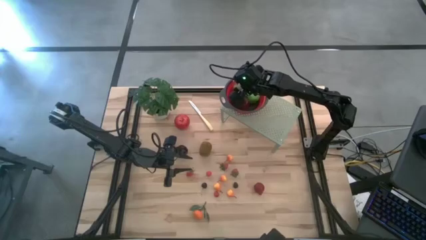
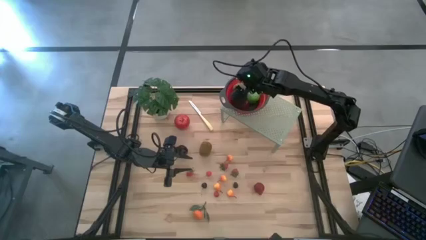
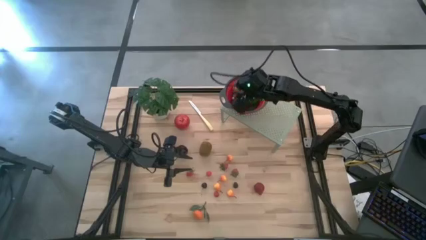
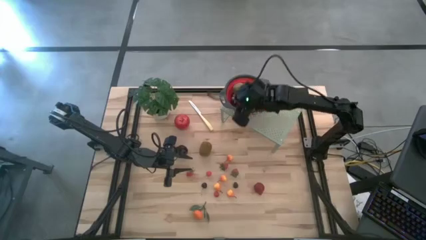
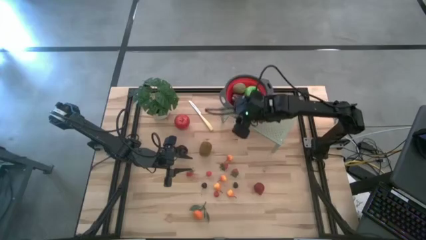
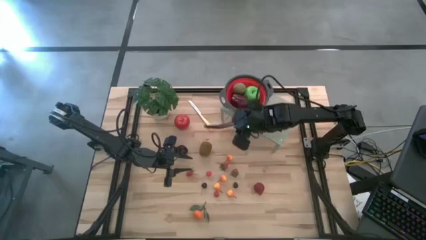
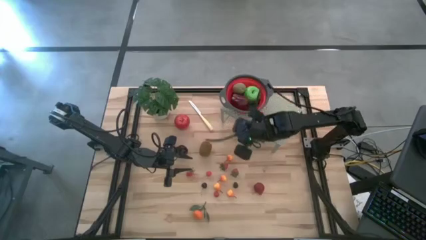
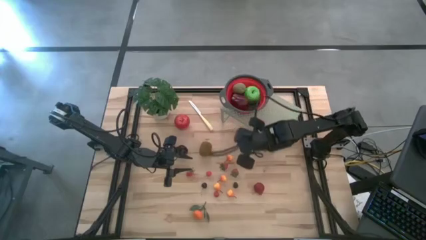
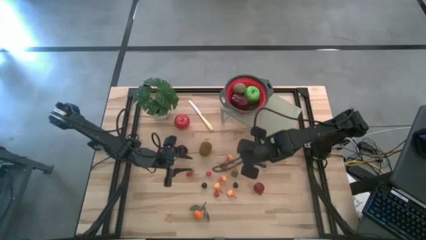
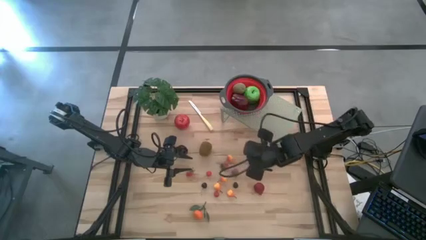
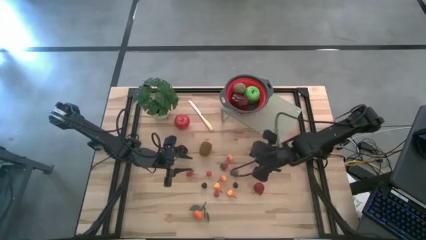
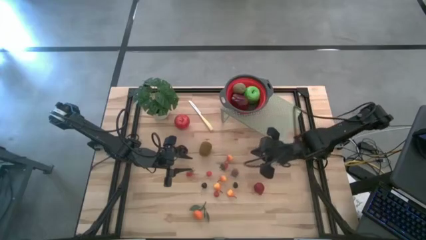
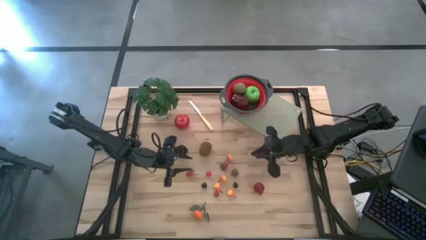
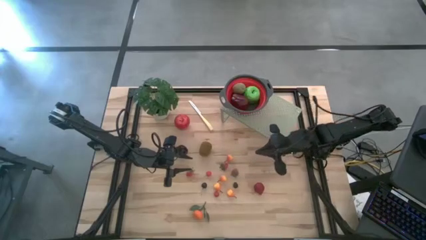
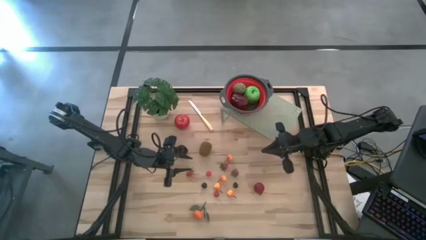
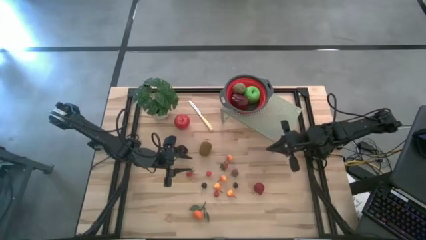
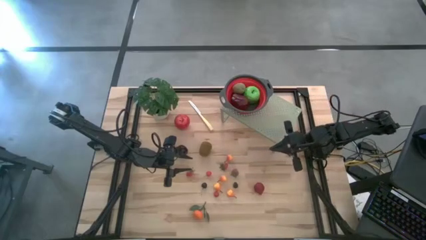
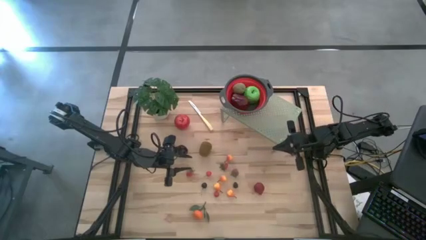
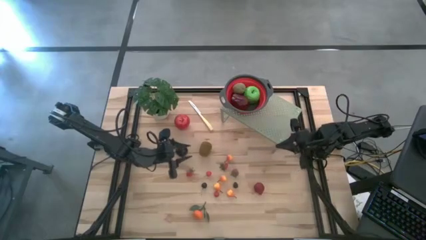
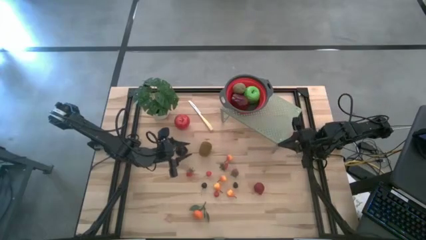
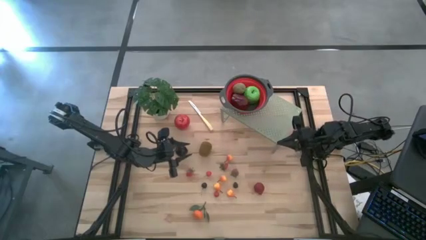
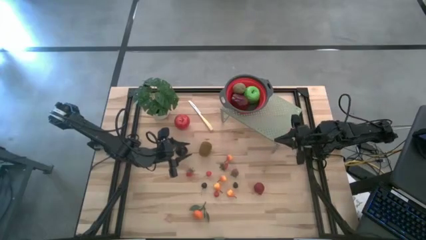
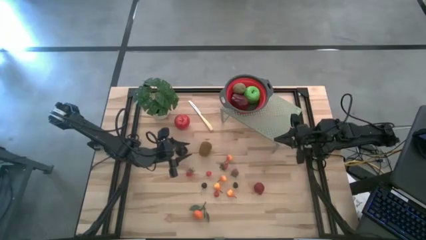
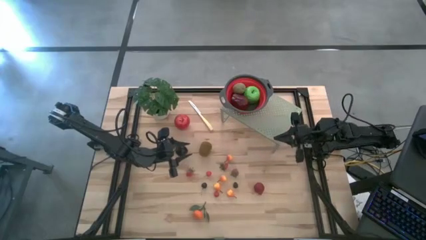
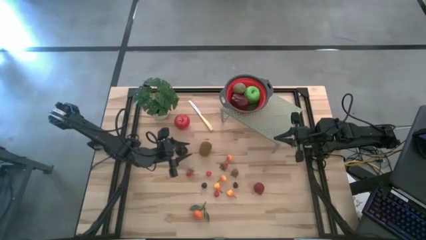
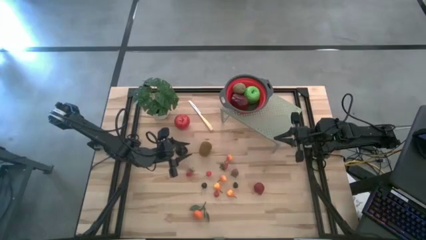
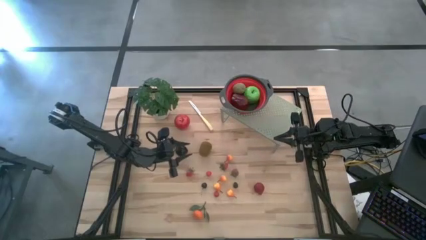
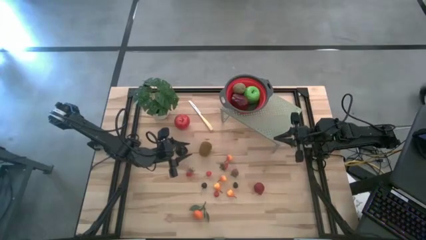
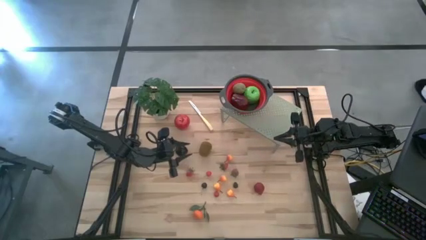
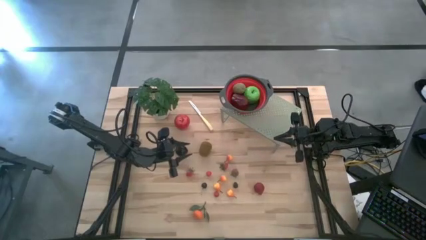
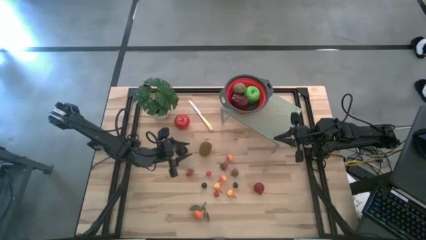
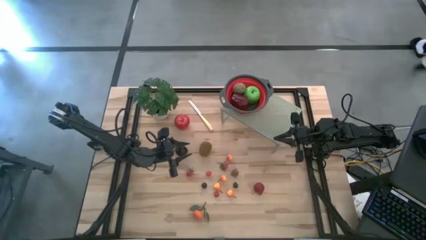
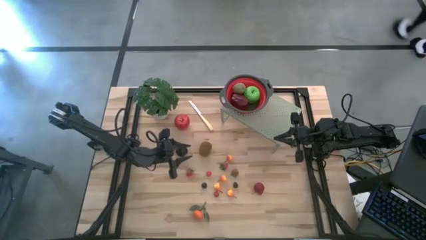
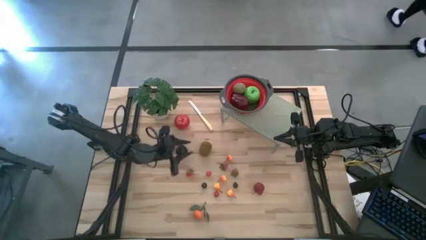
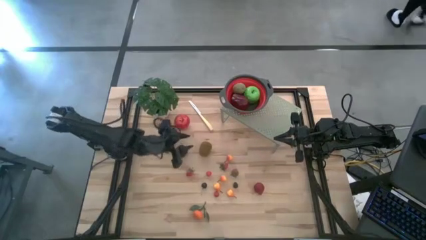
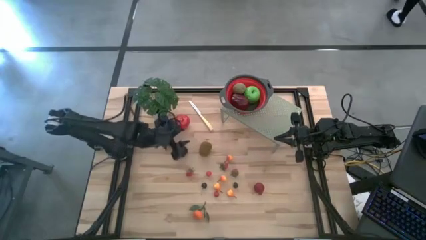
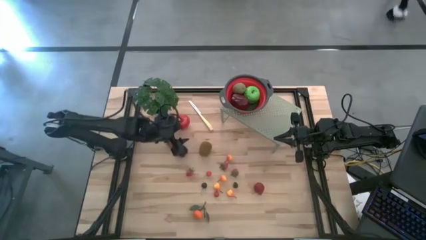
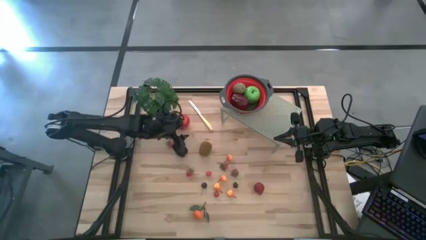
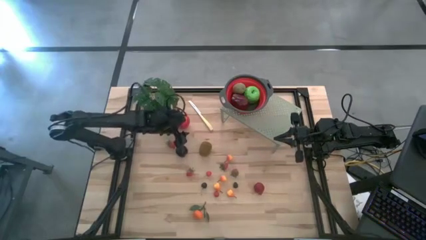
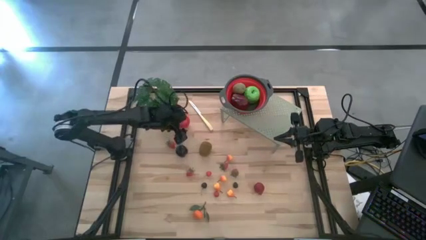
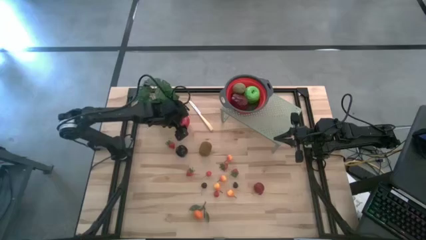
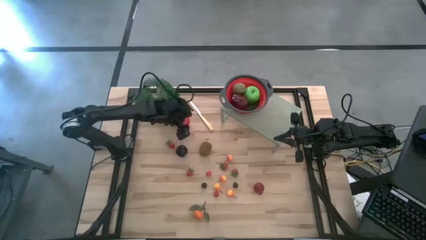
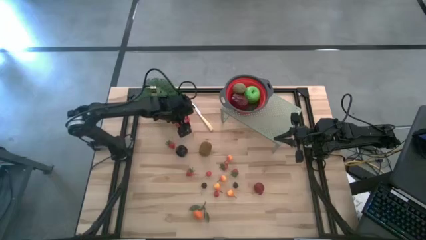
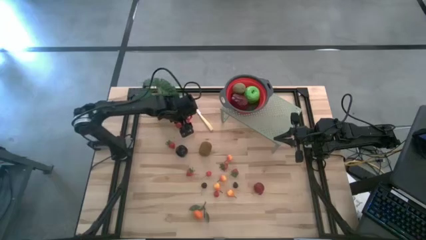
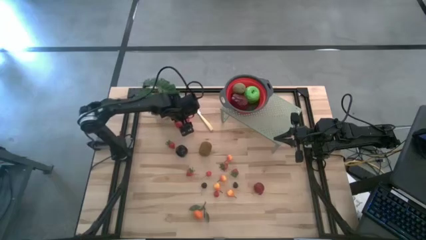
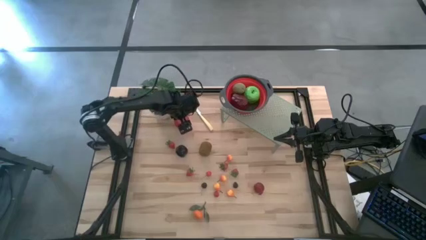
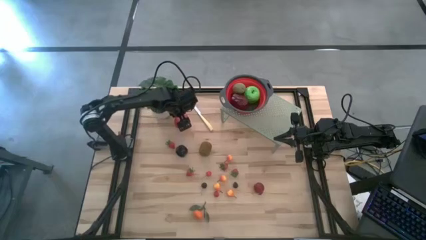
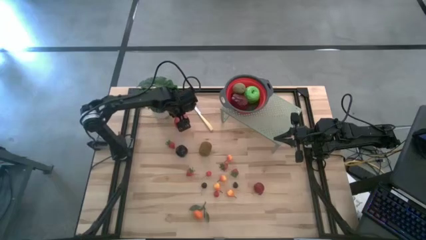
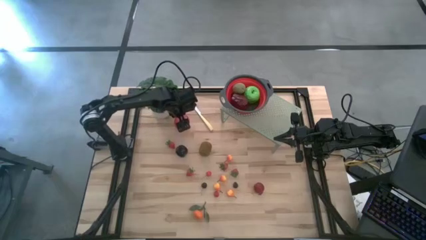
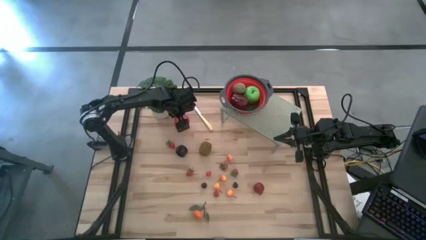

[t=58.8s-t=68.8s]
Task: Pick & Place Fruit
Put the red apple into the red gray colander on the shelf
